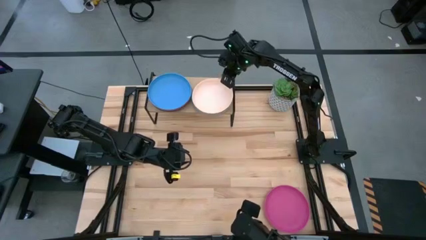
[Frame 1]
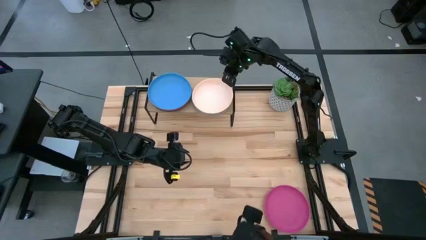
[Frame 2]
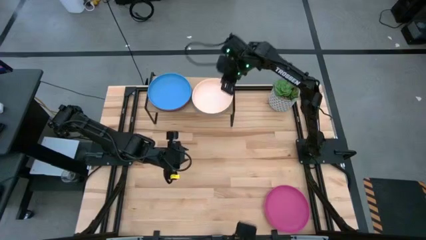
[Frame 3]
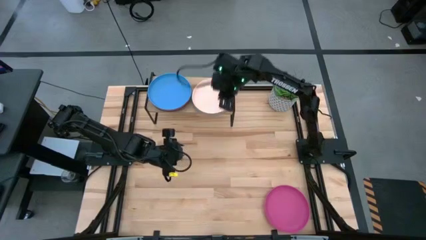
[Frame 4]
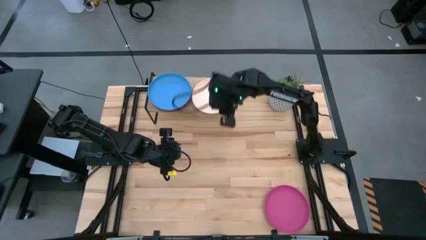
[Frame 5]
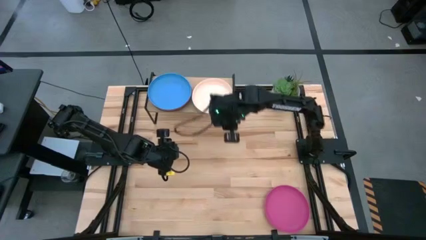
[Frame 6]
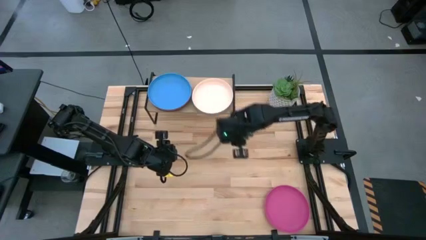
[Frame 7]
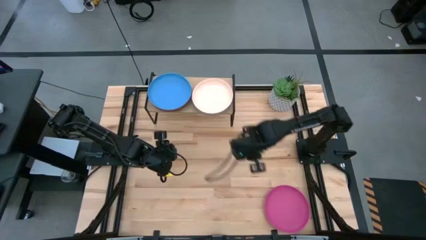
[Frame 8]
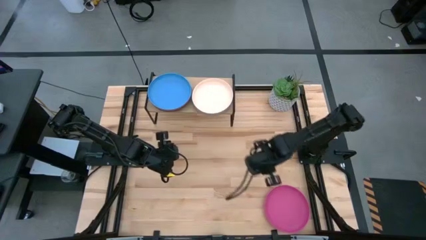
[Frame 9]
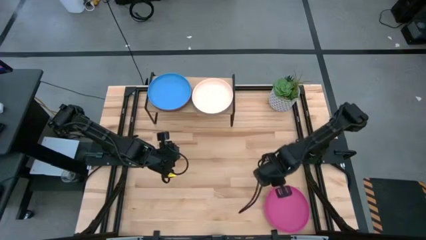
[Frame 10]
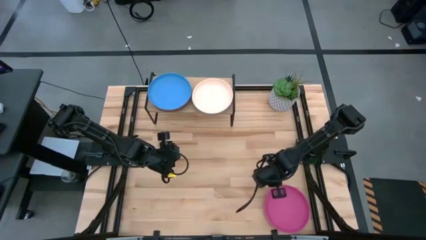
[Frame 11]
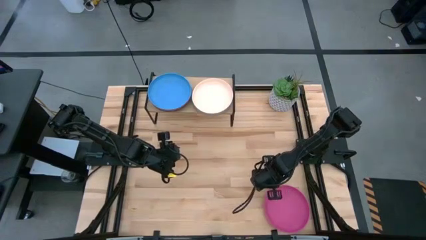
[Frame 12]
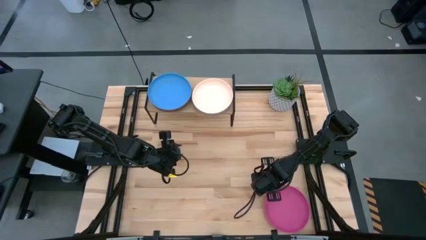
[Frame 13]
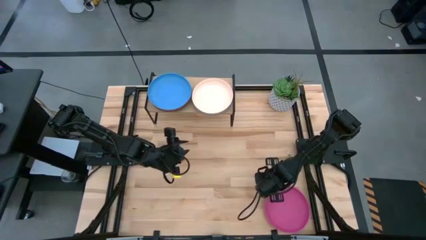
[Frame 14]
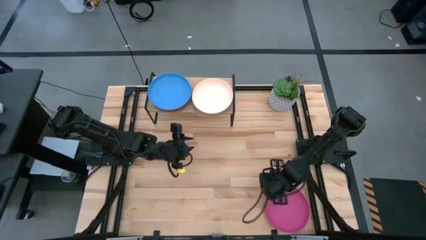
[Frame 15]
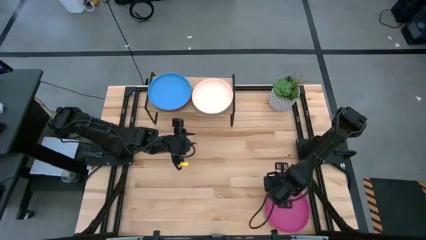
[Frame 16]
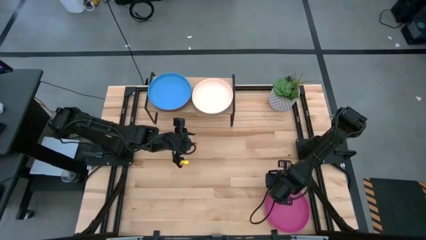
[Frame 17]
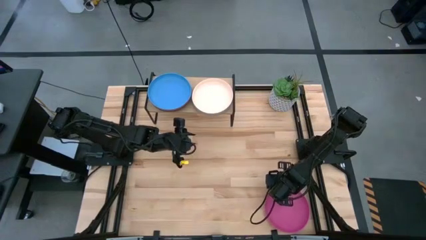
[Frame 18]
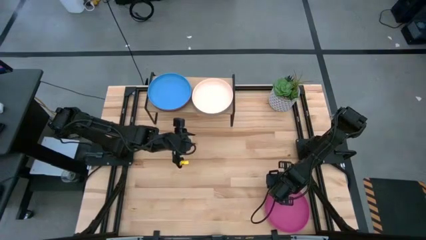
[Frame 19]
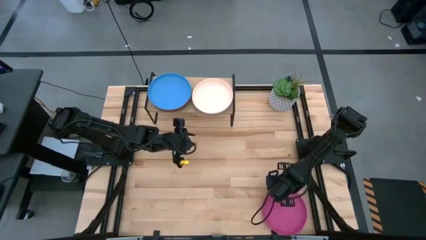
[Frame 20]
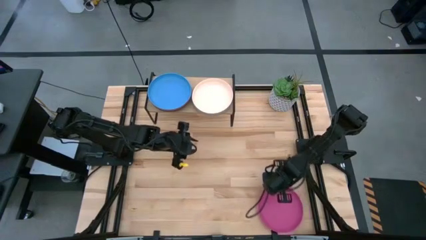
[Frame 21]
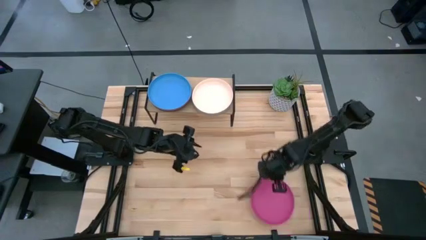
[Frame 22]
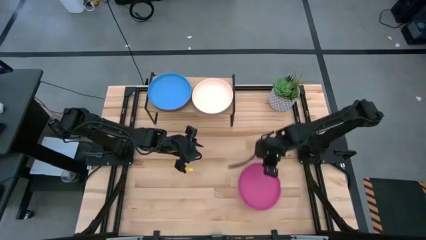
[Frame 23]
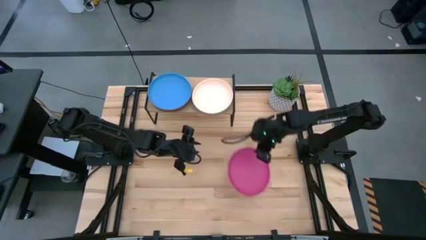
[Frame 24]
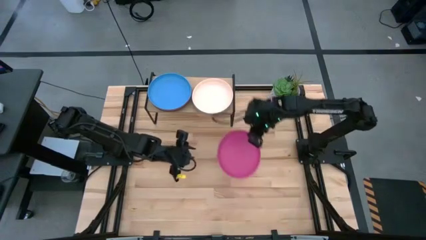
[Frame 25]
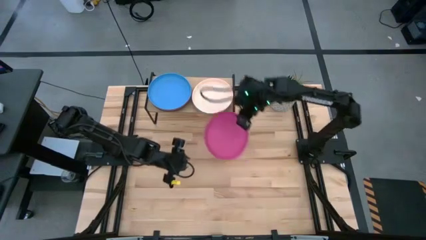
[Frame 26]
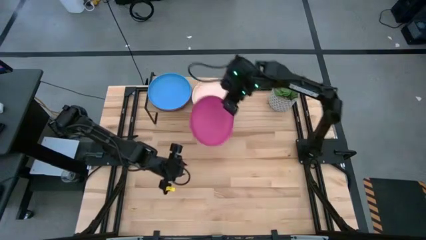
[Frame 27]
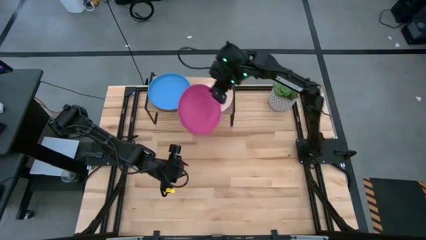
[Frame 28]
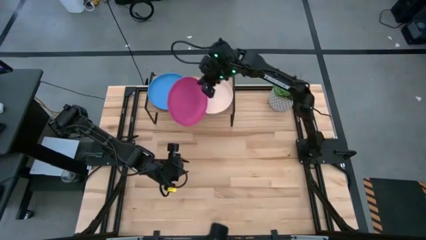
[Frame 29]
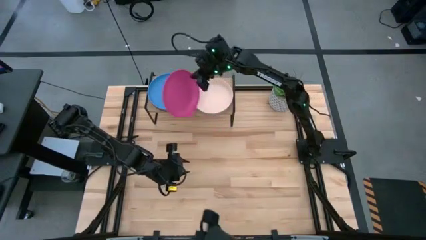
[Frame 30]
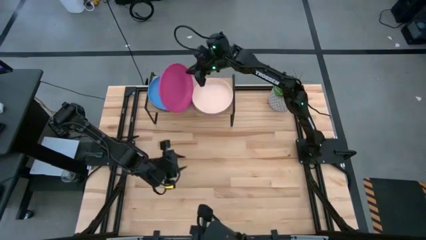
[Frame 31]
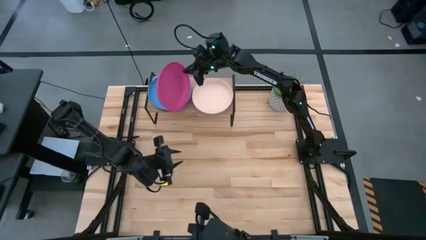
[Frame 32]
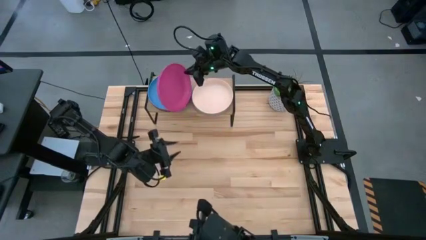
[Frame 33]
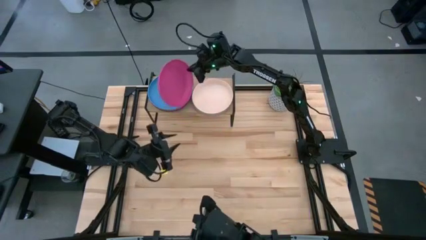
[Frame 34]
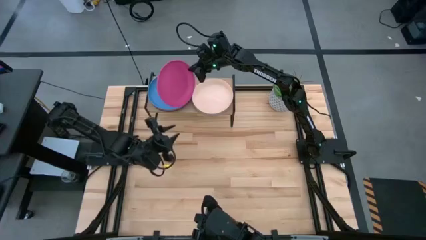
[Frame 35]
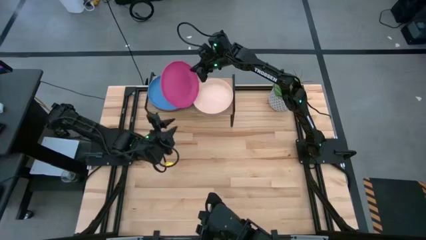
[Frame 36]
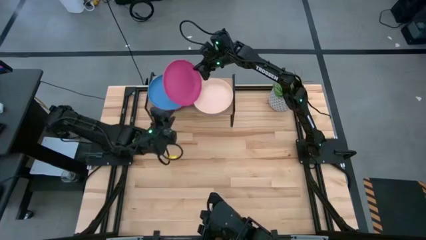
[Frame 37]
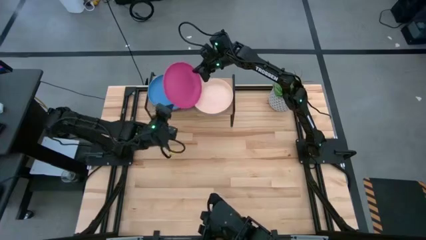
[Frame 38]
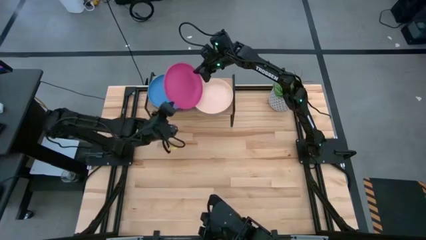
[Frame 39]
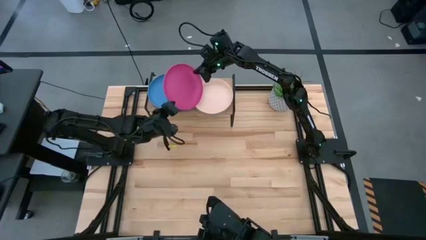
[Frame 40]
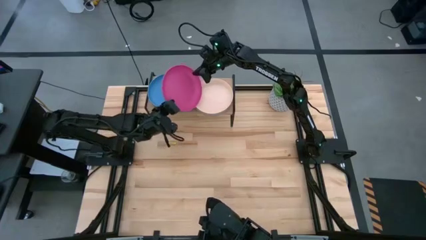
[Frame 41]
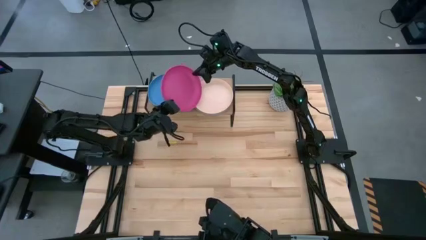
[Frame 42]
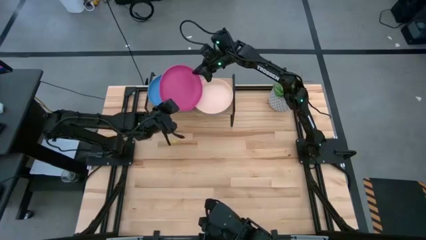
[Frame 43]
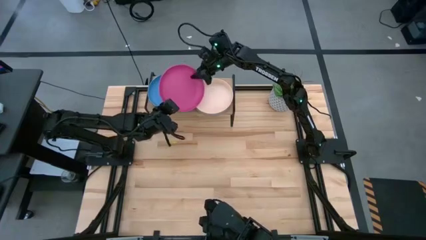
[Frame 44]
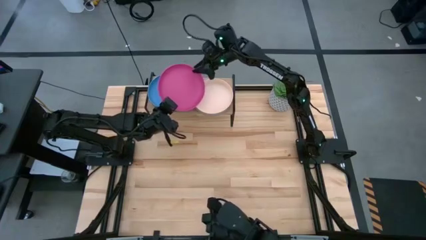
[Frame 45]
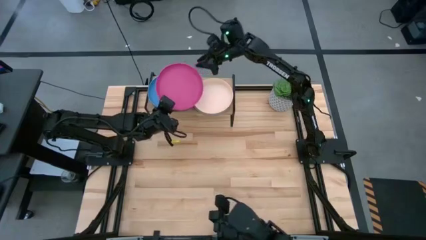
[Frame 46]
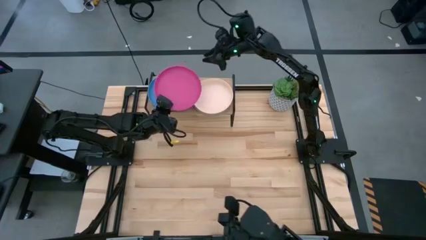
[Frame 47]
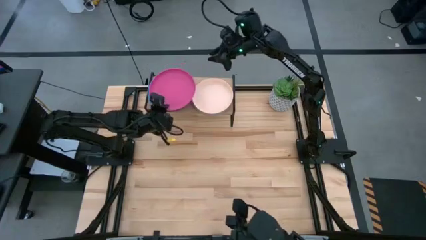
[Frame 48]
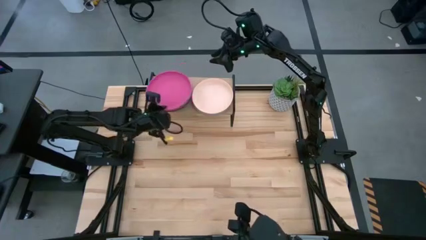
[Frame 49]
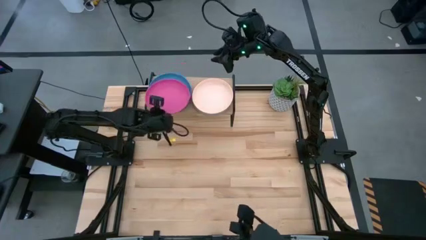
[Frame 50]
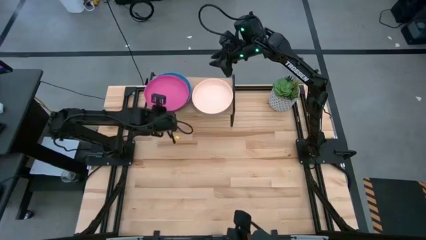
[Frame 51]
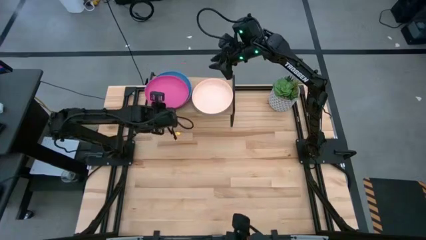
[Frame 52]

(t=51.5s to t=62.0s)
Task: Place and stack plates onto a shelf
Stack the pink plate on top of the blue plate on the shelf

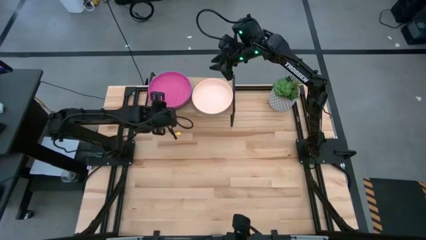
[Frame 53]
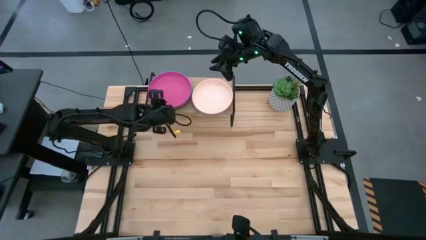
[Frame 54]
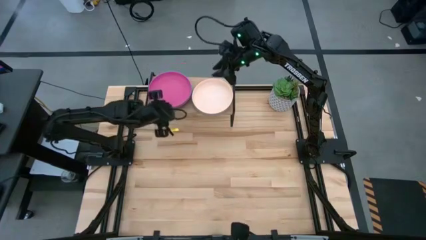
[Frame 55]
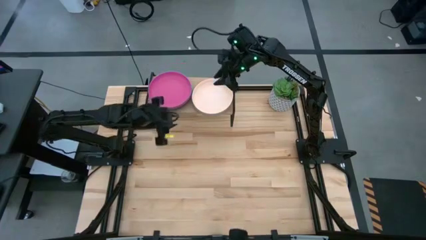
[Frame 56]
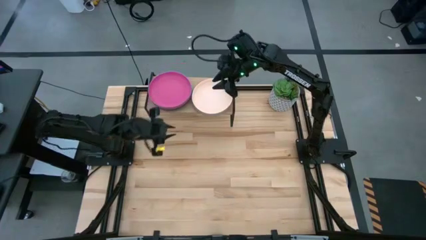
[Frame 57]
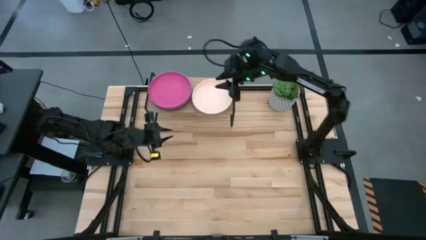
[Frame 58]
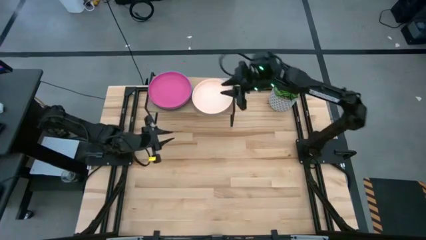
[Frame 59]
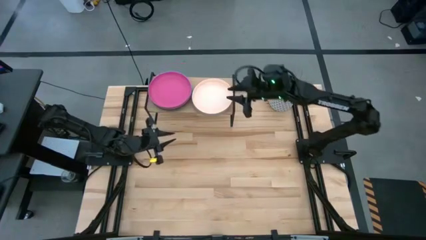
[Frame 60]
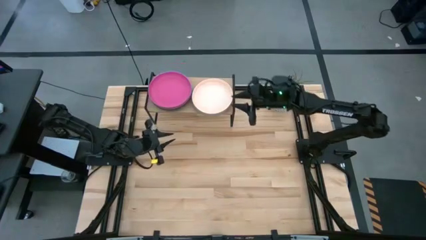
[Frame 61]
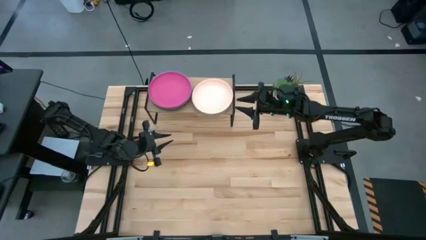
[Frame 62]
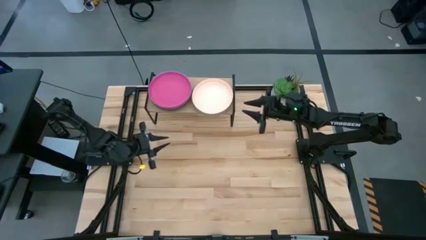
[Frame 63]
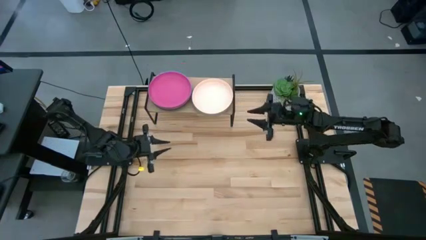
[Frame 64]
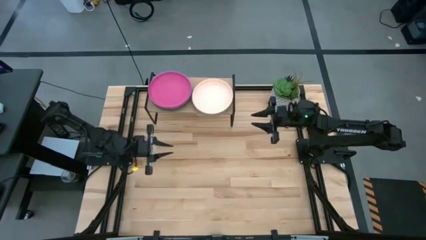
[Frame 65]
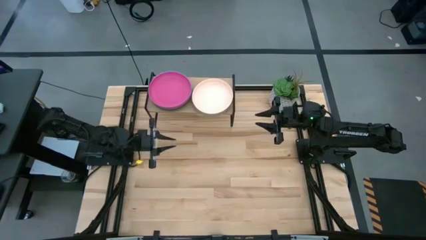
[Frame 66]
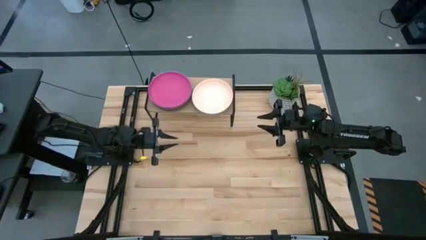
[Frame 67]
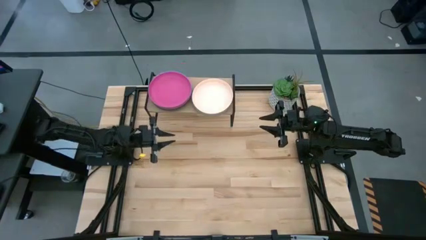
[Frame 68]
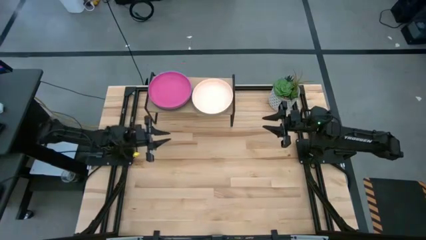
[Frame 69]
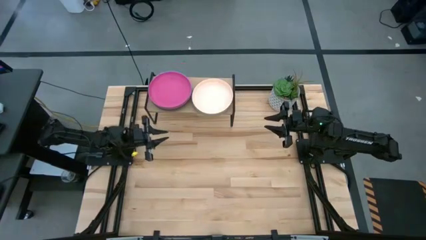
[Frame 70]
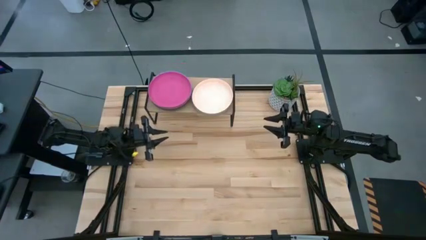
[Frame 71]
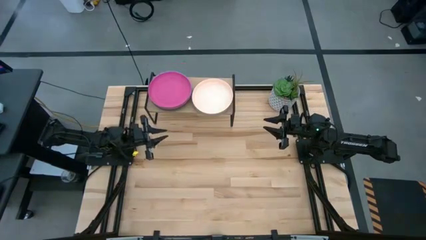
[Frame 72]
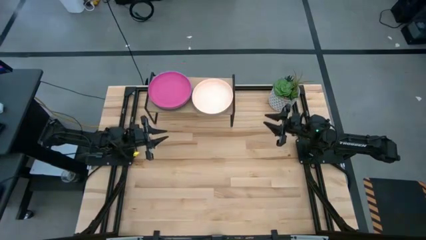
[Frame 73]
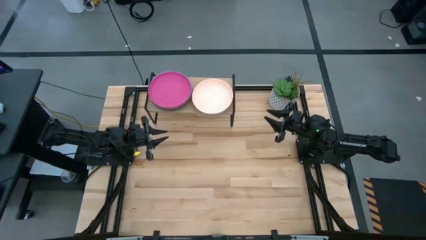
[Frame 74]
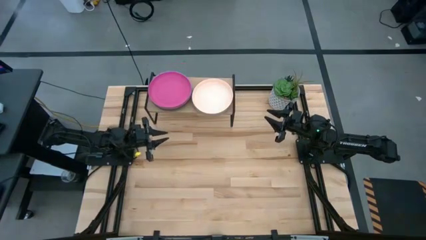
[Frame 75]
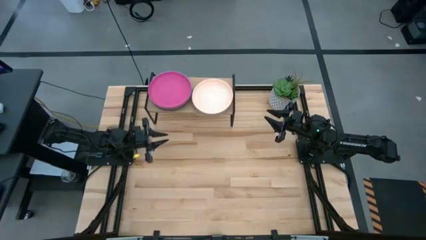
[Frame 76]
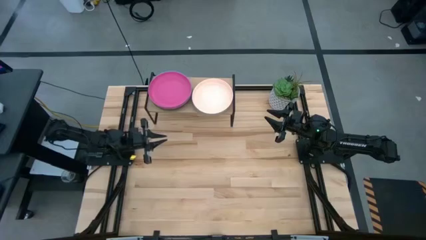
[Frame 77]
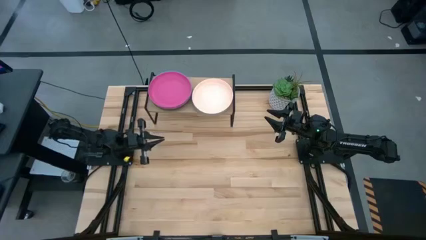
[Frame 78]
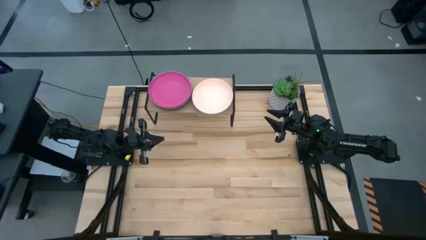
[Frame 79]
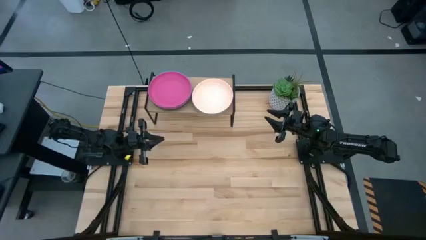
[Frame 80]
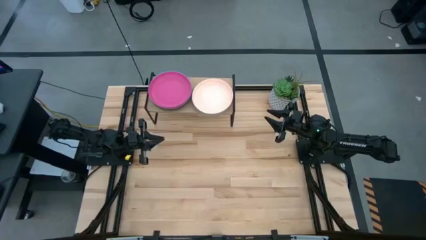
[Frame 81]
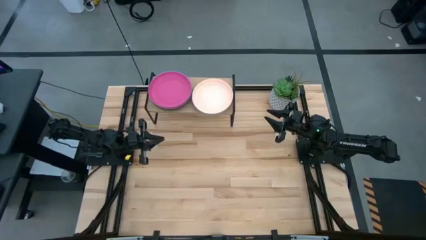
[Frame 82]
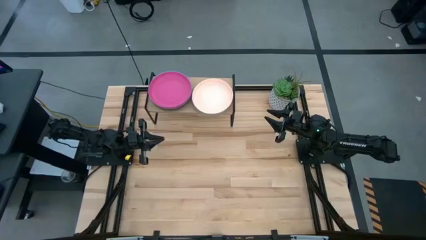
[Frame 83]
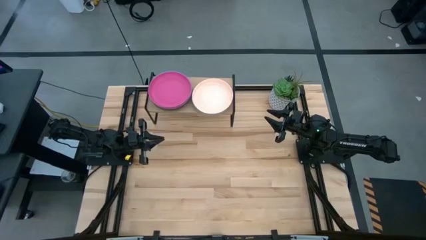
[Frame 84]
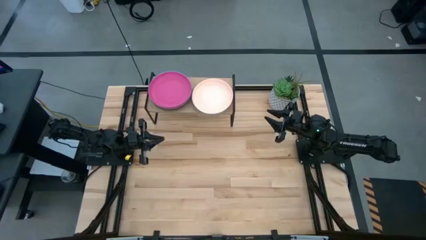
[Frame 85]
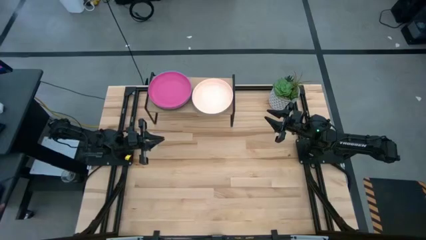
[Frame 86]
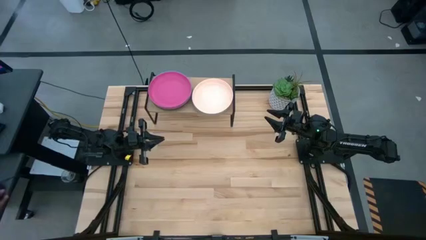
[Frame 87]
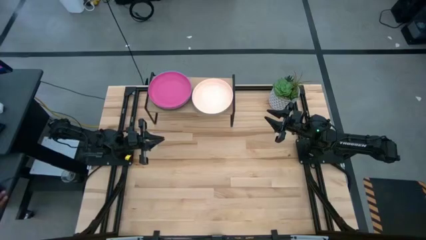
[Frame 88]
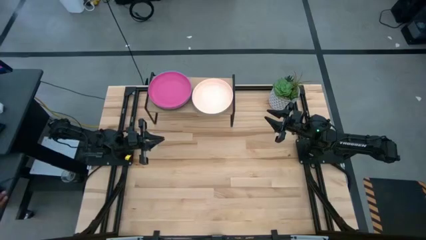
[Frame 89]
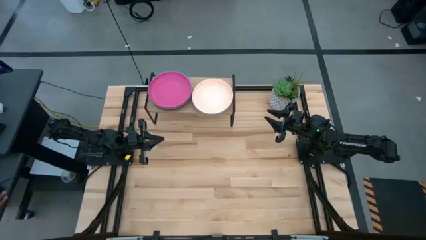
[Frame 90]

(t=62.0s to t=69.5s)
Return to Home Position
